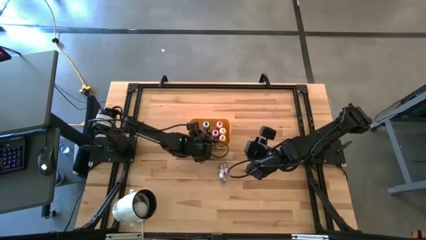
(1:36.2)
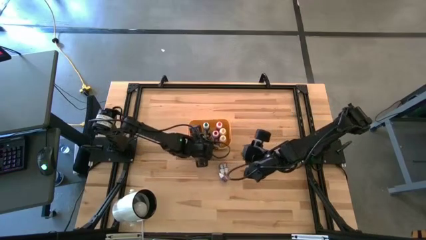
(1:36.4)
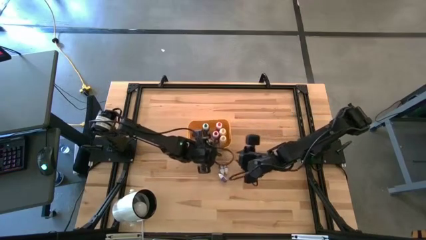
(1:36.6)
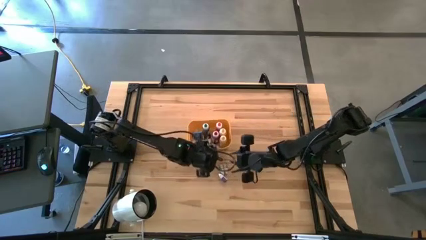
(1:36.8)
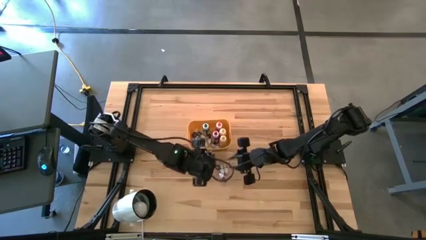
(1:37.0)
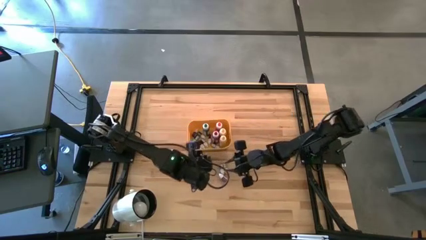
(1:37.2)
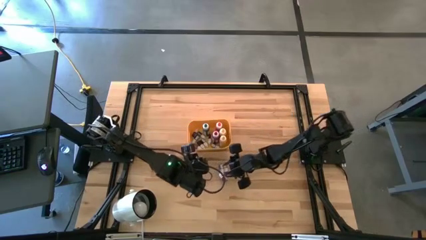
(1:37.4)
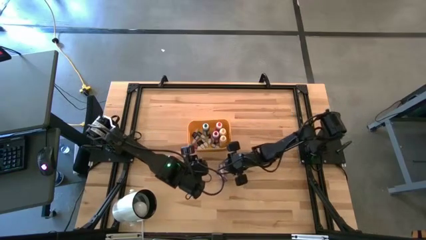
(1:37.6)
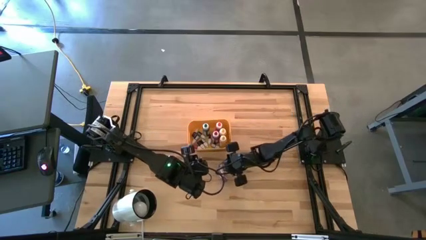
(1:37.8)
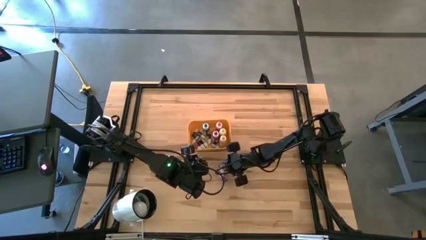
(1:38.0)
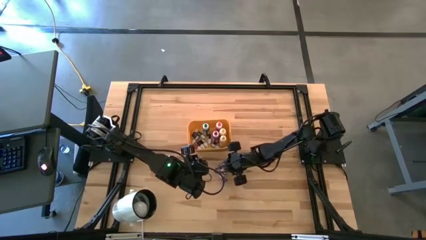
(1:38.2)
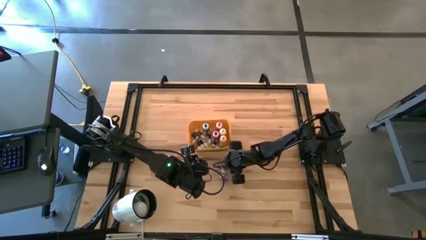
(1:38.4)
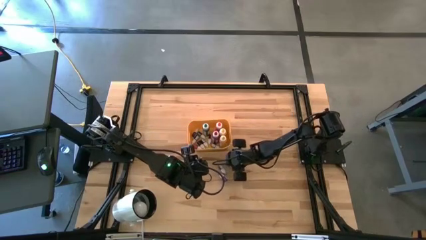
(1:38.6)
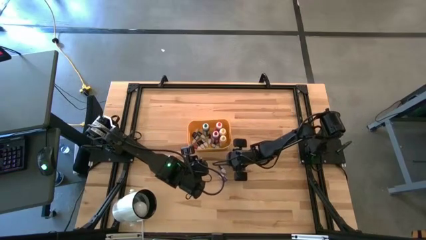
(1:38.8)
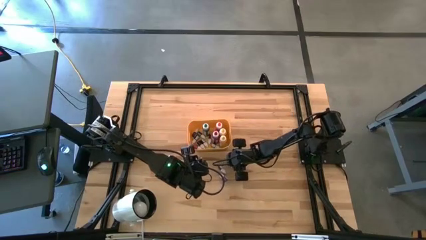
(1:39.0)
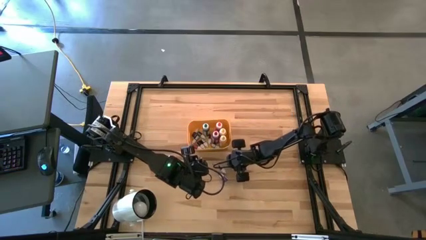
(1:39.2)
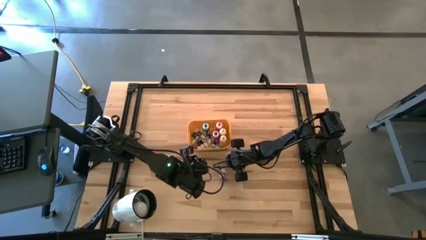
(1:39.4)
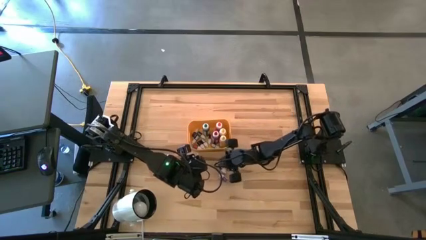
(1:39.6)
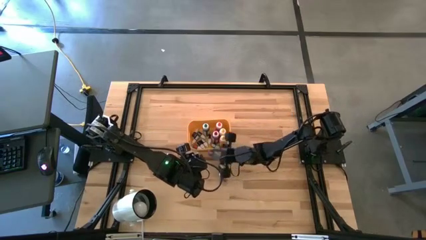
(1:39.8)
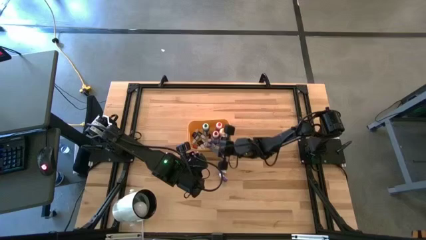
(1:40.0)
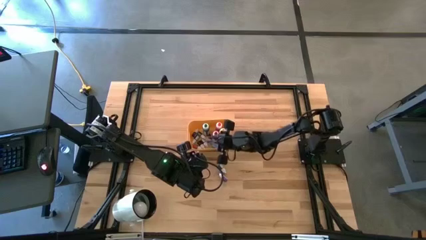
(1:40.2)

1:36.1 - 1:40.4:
Task: Pick & Place food coloring
Put the small red food coloring bottle into the yellow bin

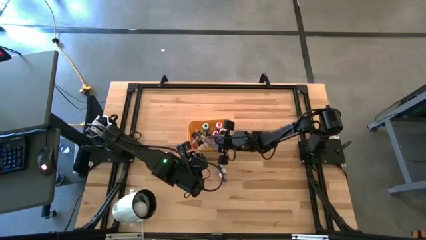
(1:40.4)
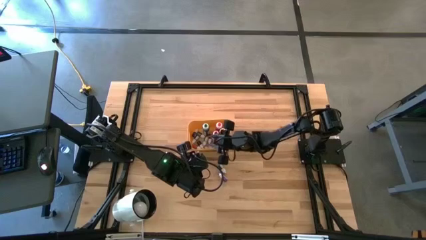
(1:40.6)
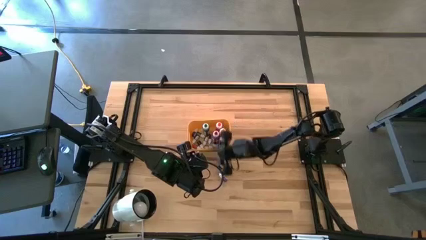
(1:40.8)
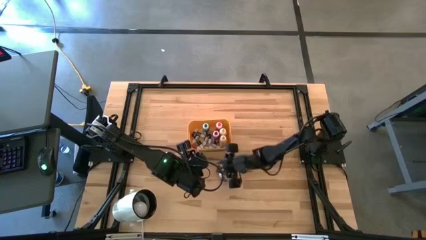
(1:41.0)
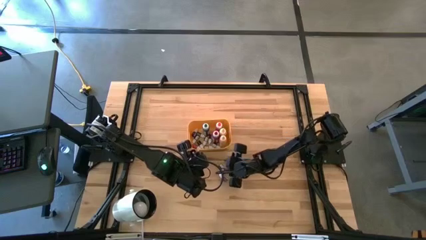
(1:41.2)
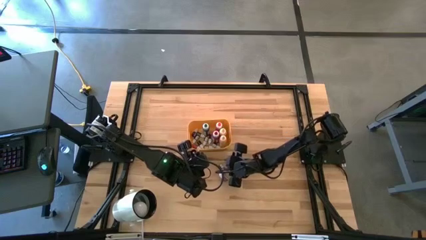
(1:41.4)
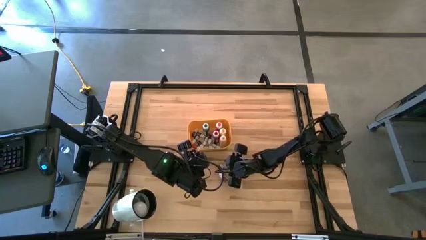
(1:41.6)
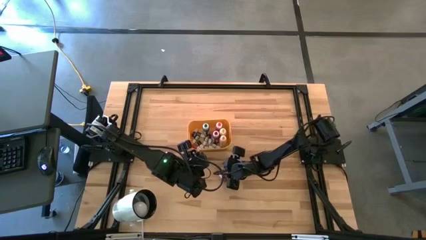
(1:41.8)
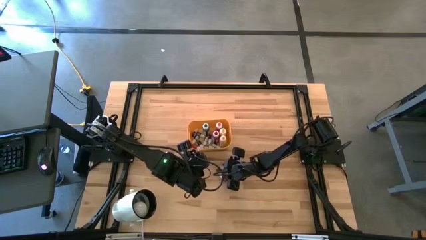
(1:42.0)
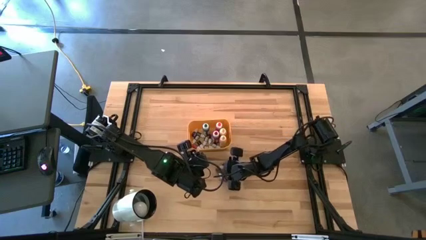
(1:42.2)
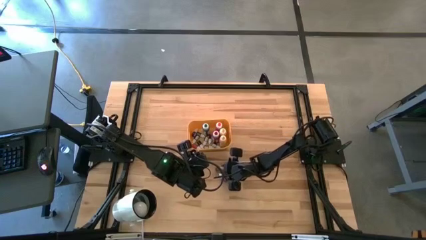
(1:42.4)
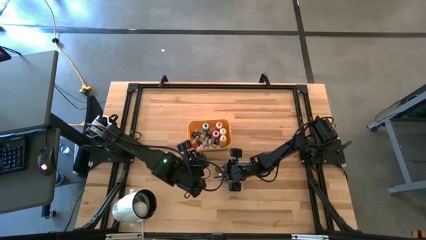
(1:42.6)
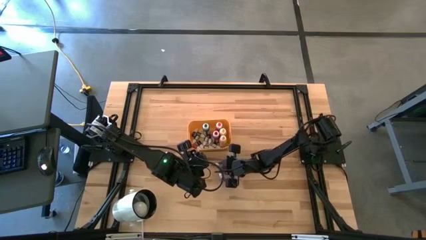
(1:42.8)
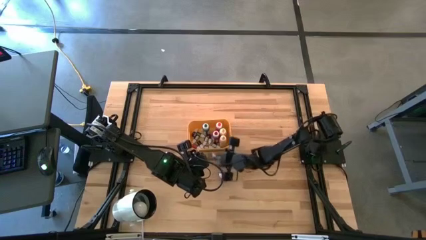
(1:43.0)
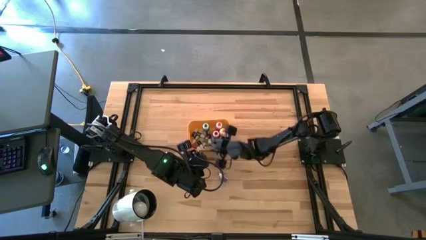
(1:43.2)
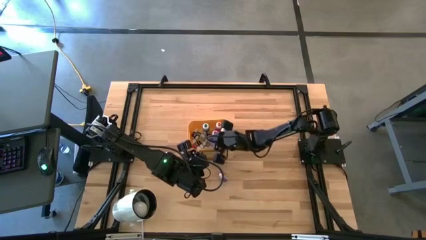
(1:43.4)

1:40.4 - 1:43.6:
Put the small green food coloring bottle into the yellow bin

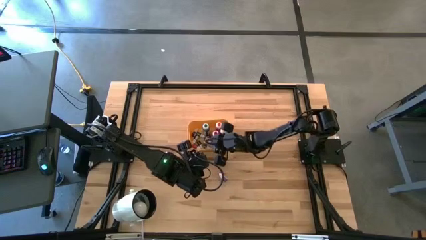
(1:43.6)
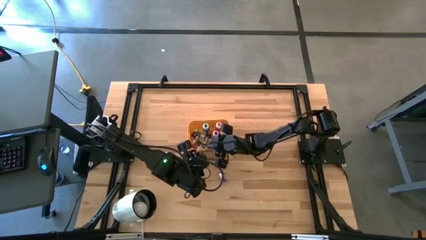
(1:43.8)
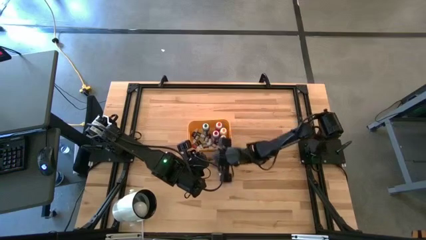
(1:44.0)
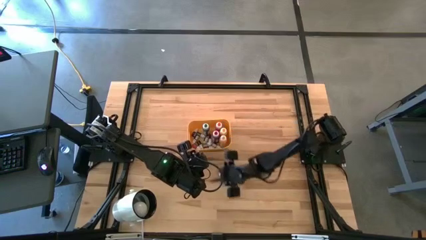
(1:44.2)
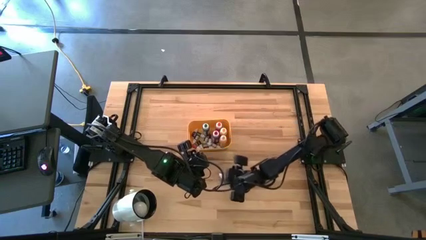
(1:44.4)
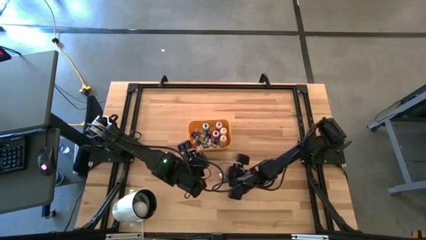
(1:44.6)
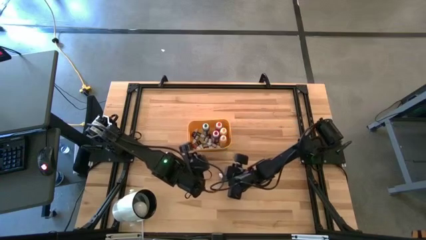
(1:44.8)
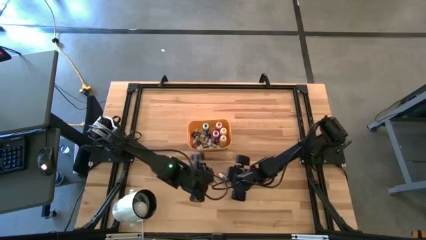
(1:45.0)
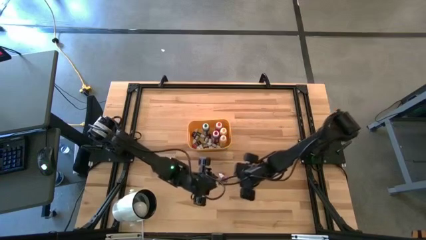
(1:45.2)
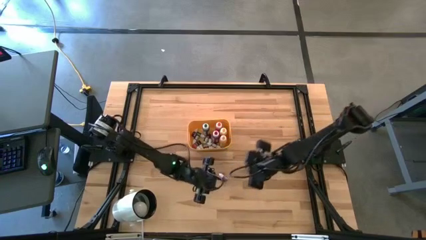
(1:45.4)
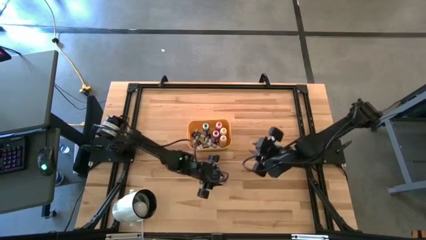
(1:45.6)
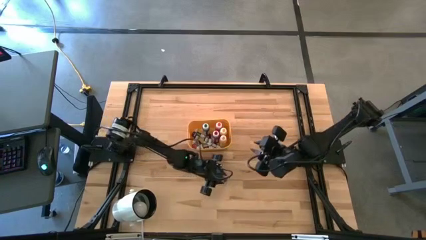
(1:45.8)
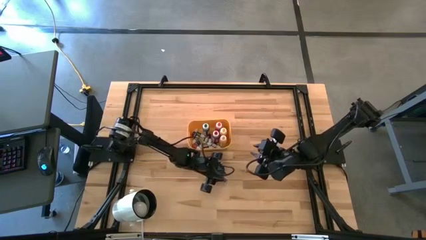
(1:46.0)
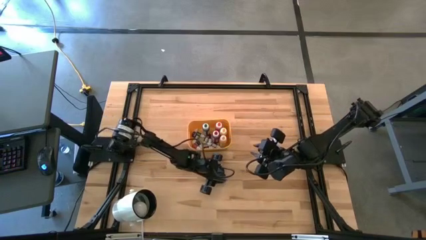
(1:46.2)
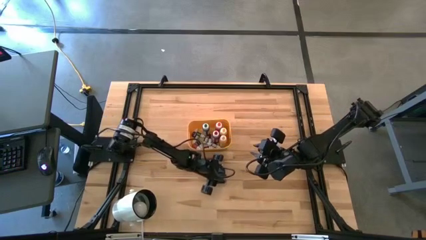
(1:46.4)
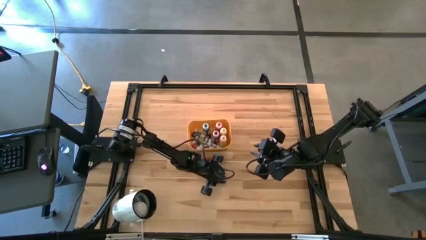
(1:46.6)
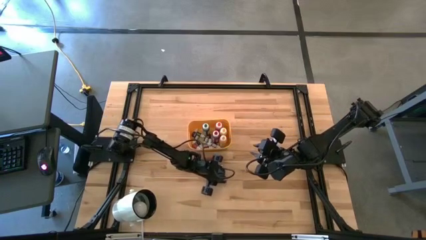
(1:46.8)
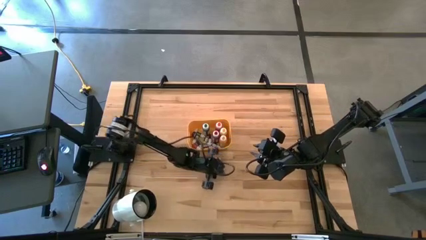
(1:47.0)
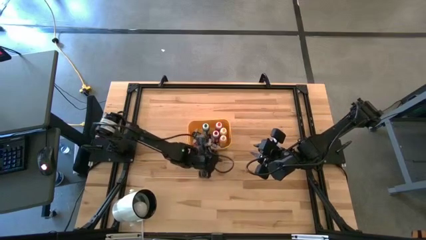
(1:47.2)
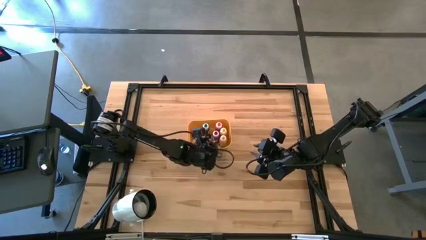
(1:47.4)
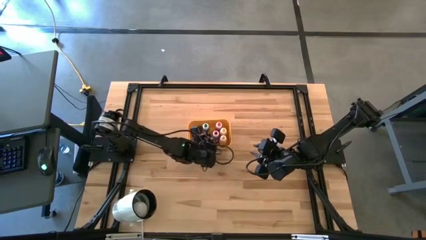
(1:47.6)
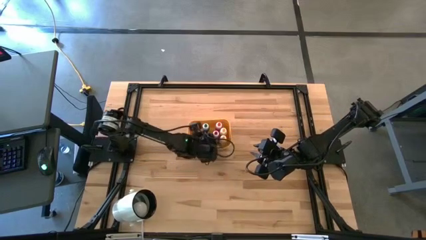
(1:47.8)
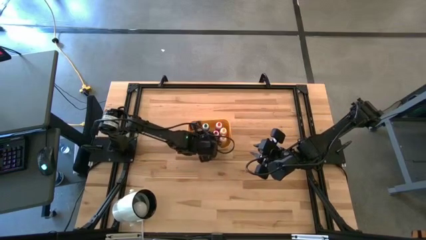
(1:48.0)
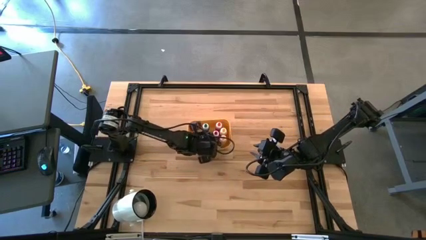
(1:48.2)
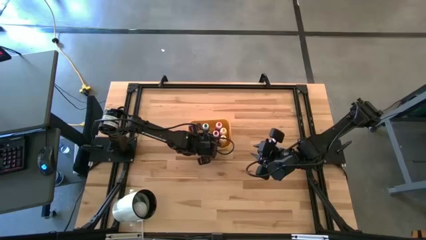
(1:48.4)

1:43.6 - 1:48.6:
Put the small purple food coloring bottle into the yellow bin
